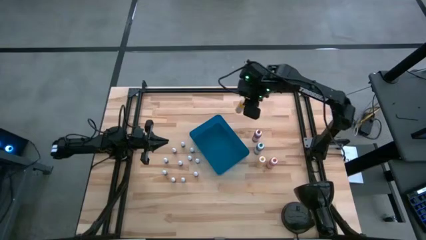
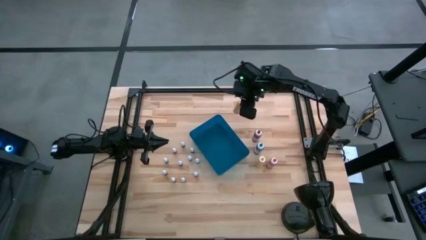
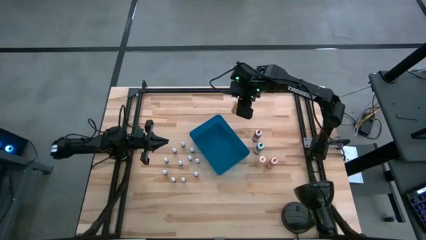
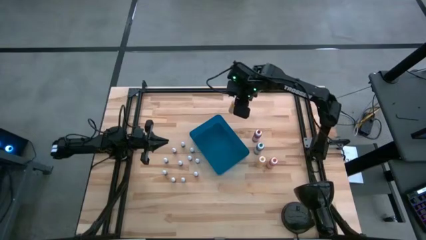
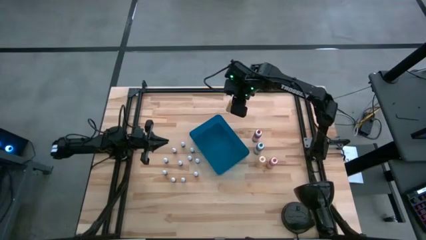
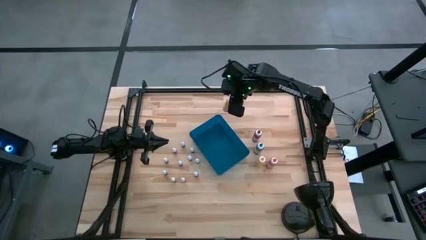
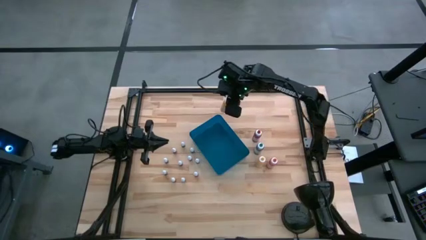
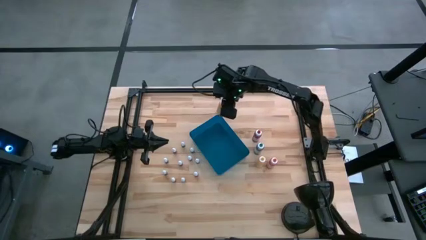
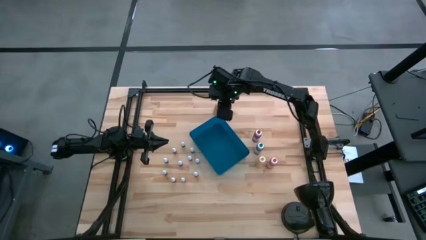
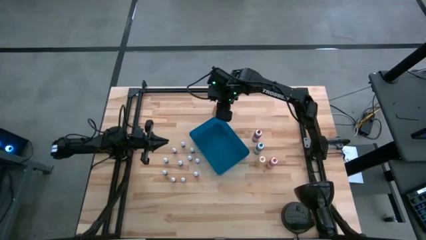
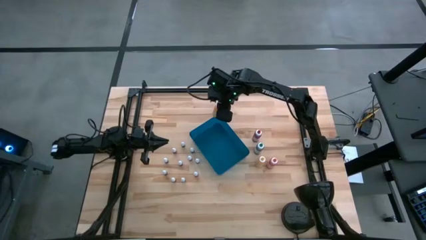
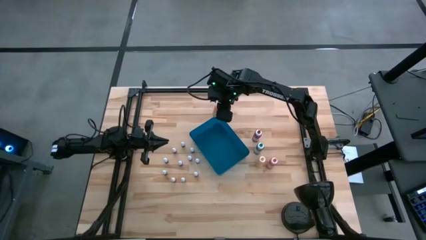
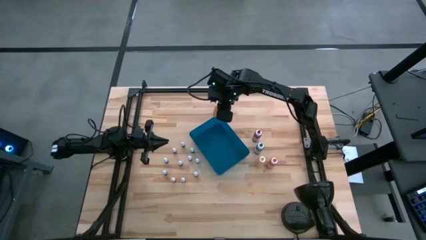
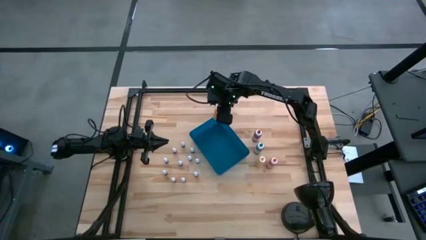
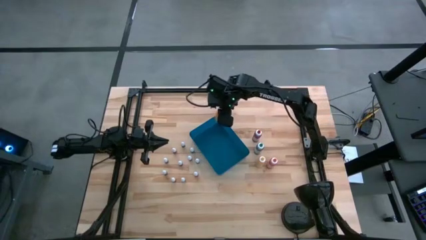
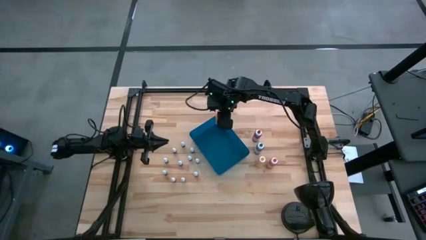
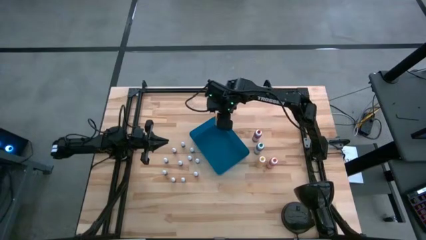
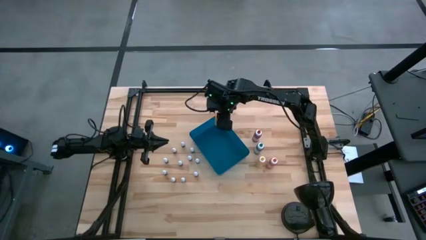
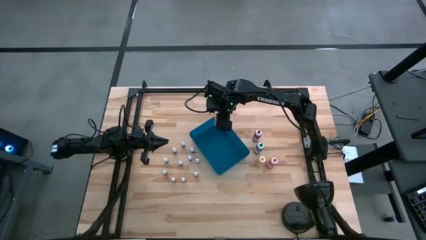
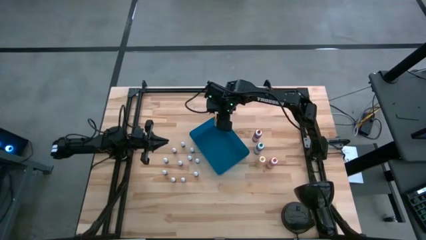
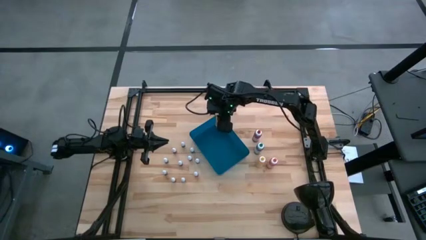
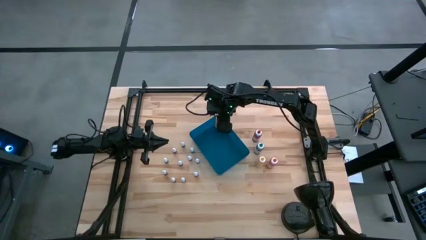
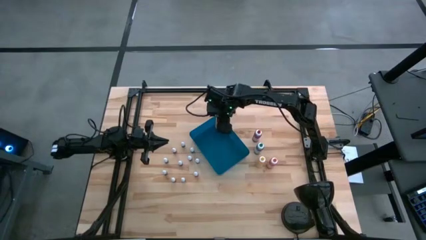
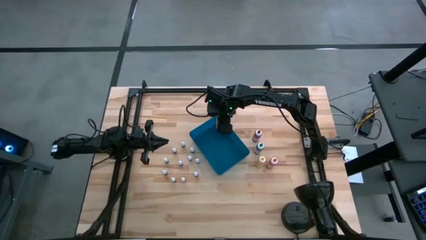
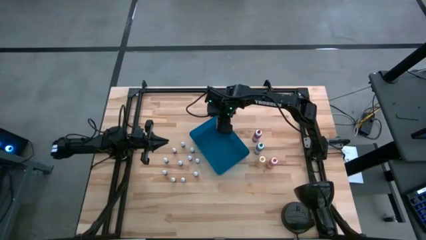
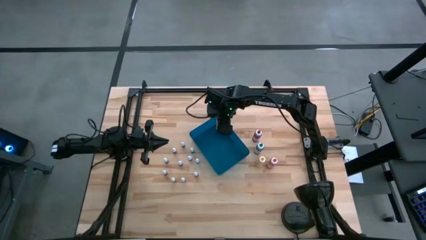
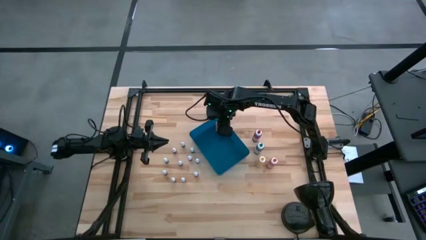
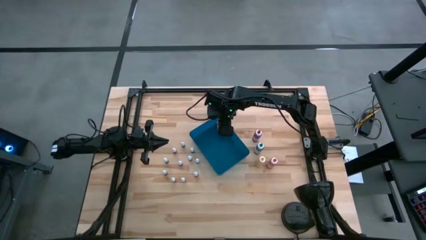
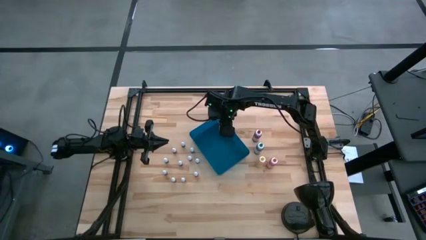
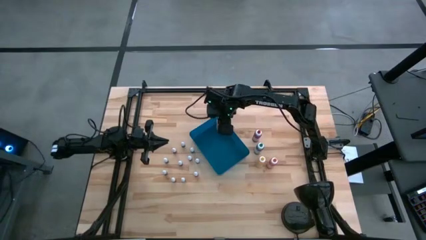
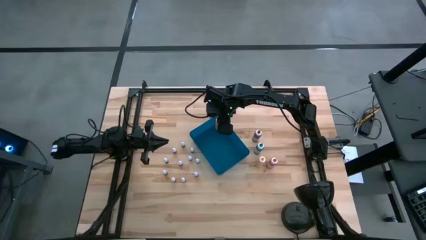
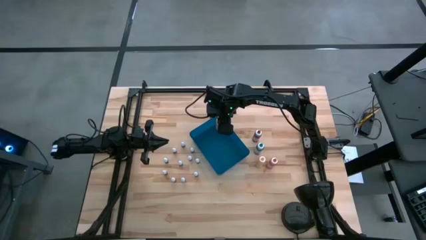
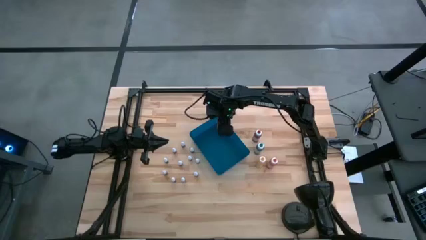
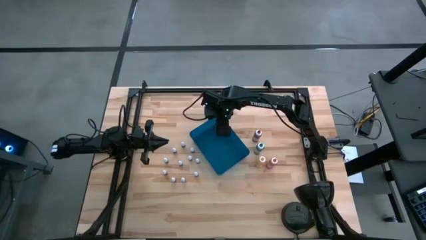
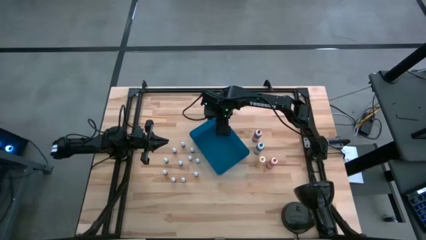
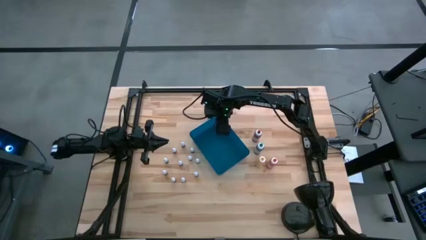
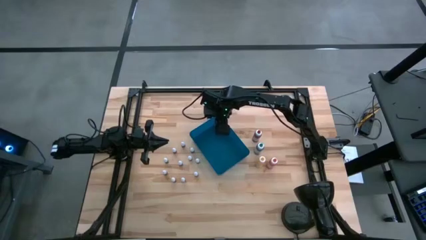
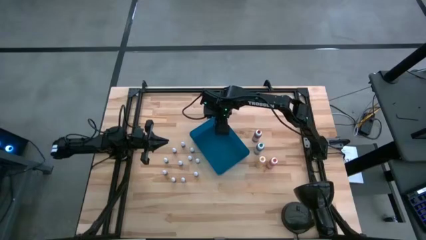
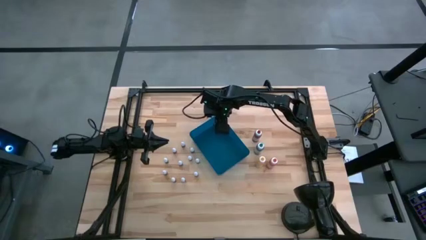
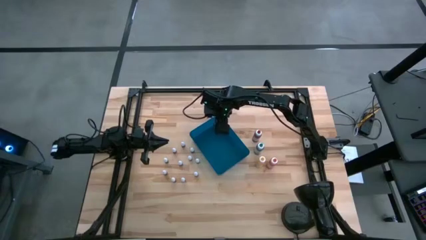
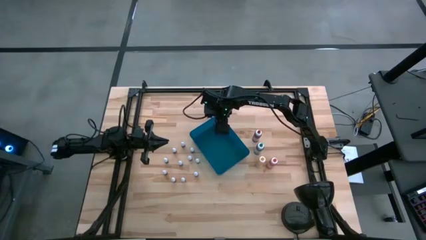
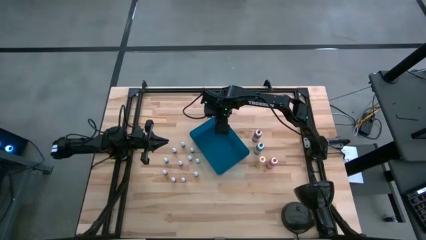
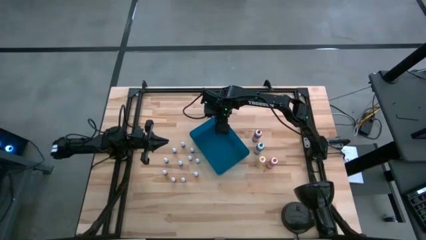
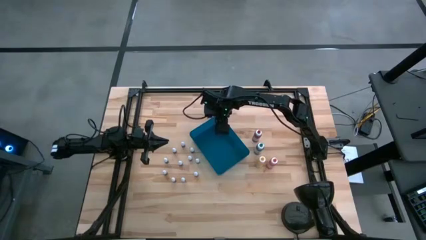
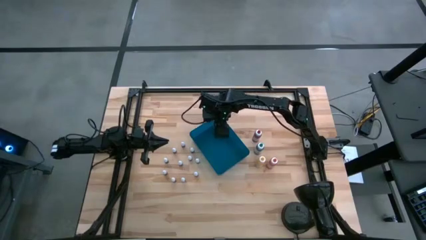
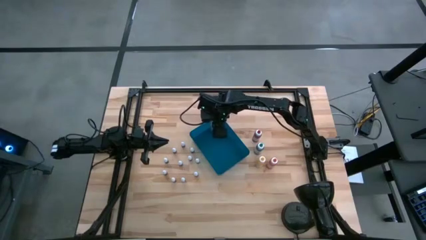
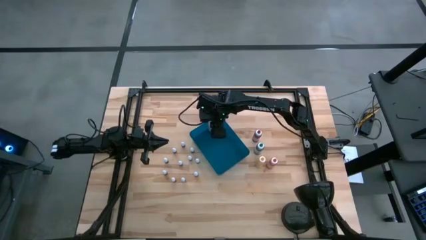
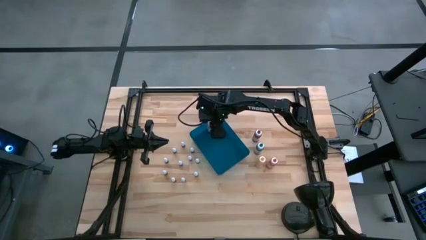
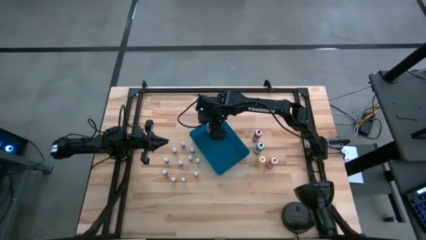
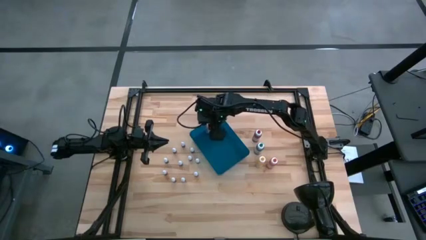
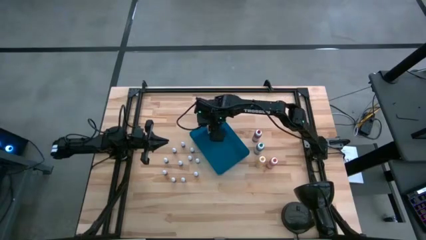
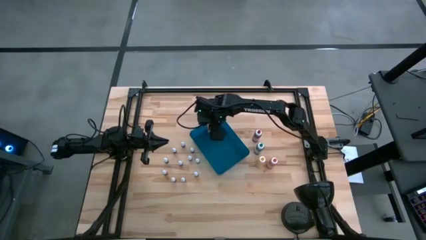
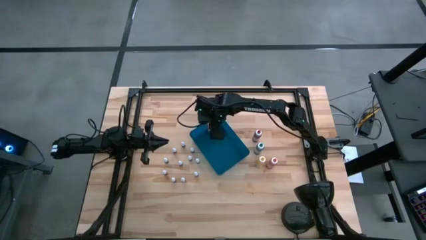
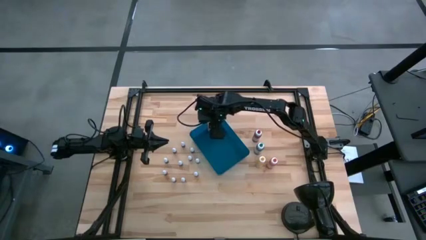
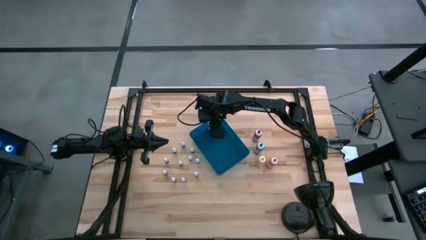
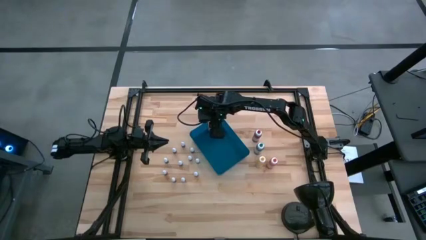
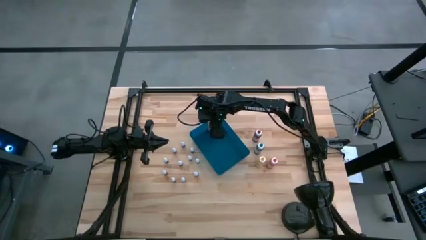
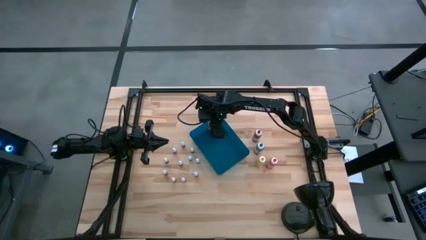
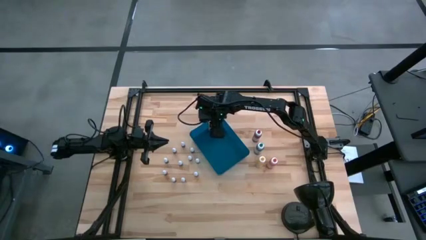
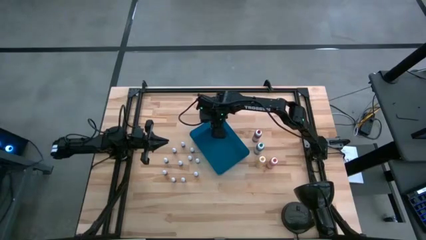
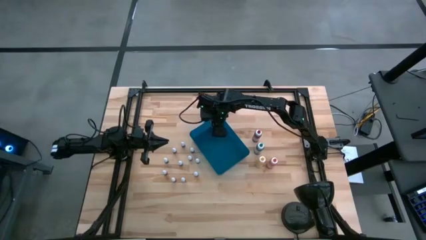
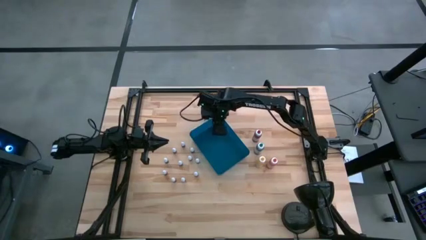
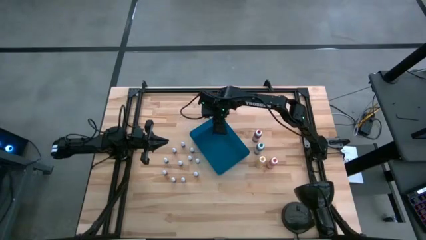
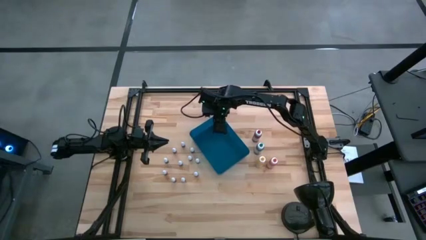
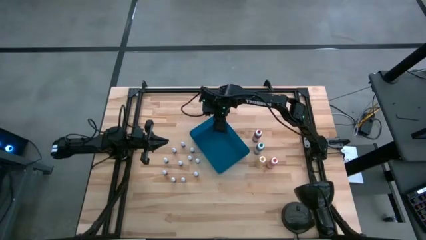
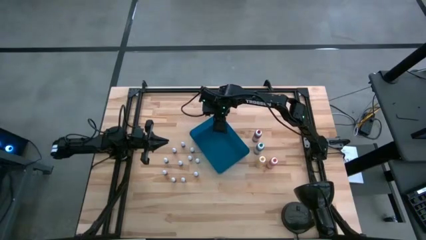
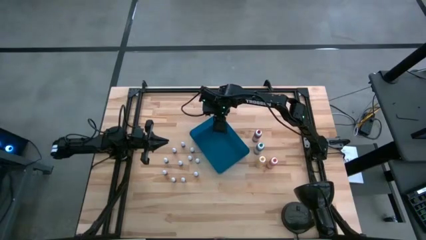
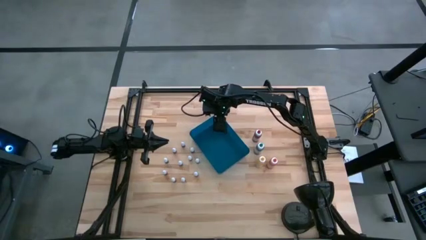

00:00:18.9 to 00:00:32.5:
Task: Pick & Place food coloring
Put the yellow food coloring bottle into the blue bin

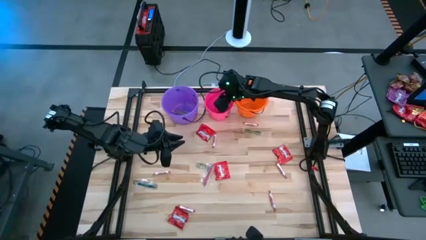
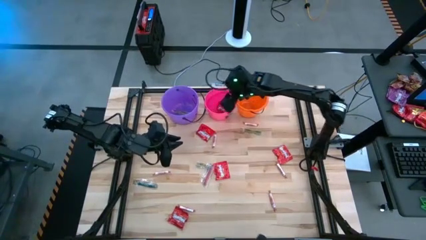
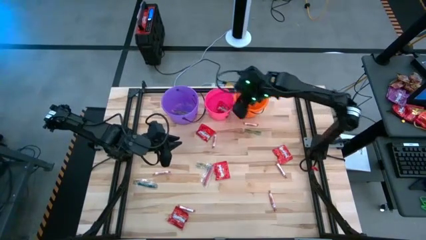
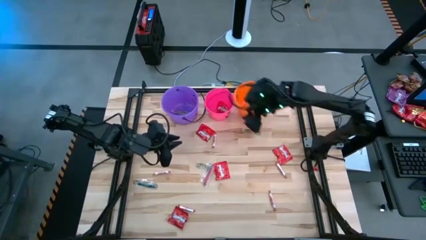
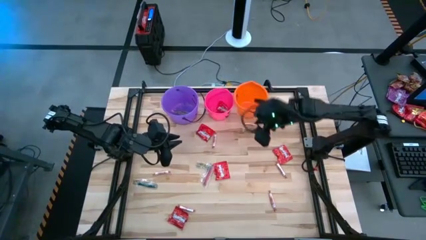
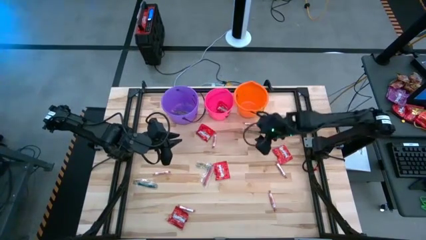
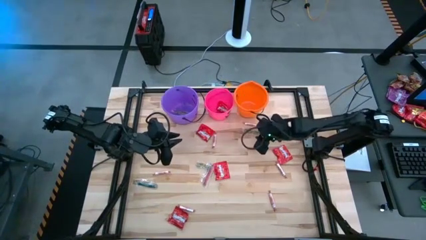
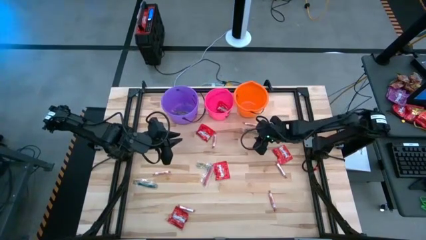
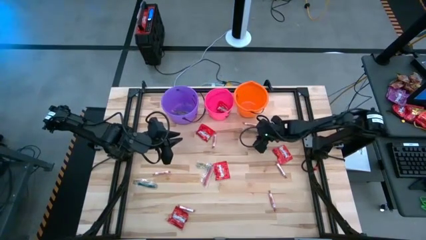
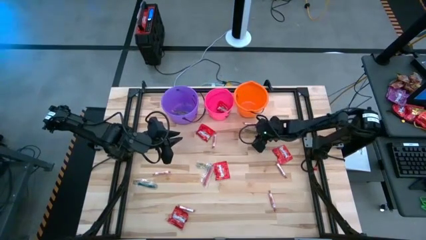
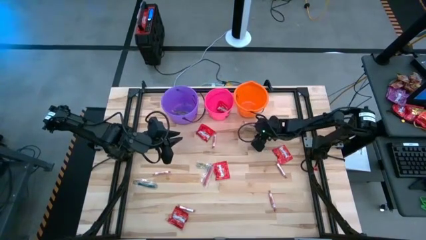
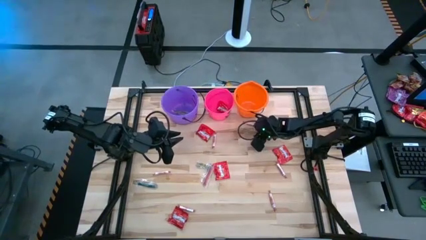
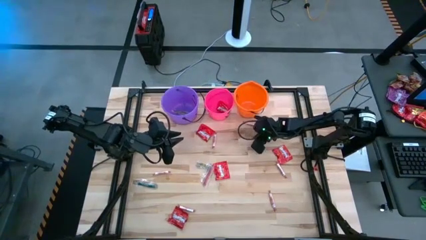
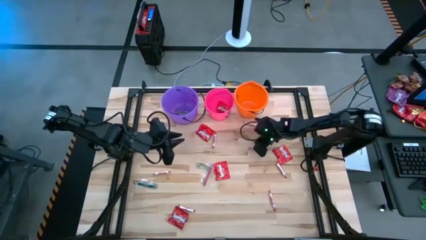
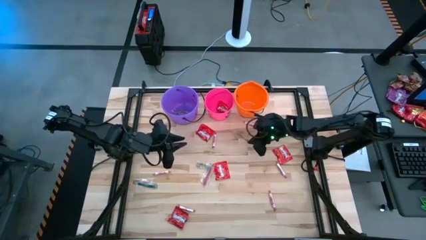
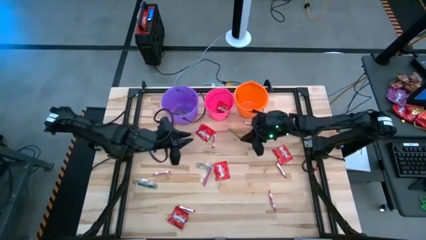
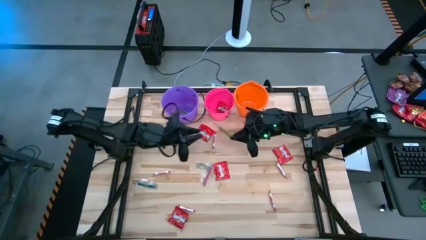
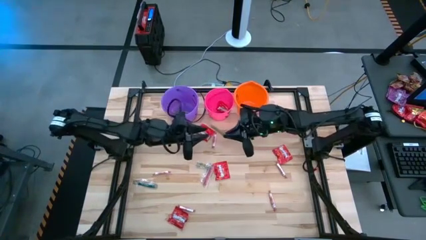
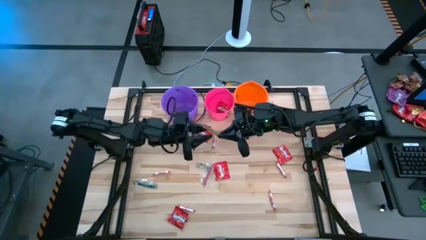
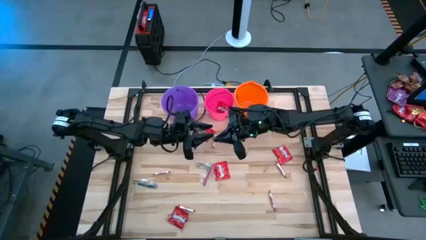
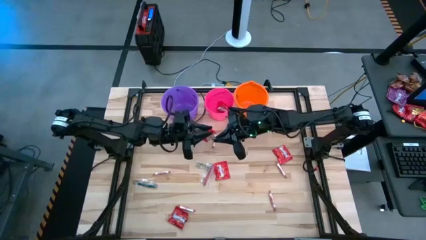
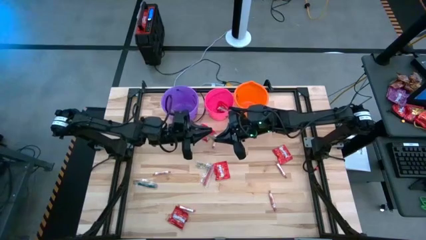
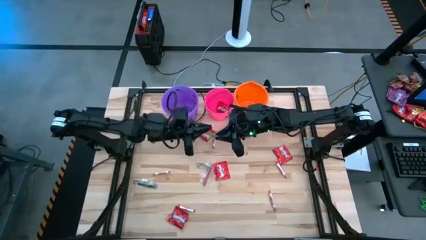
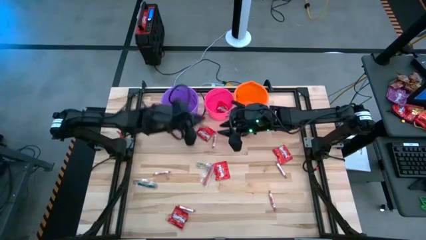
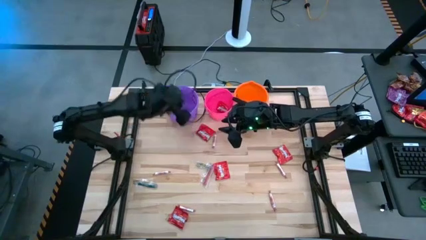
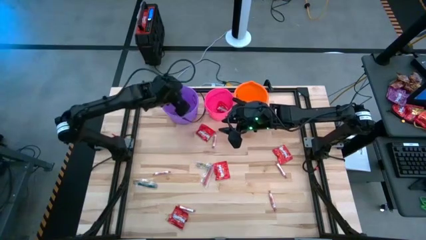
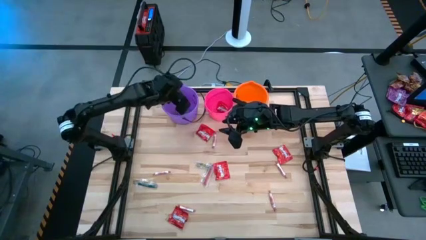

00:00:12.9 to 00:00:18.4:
Task: Sort candy by brand, put in halloween buckets
Put the green candy into the purple bucket
